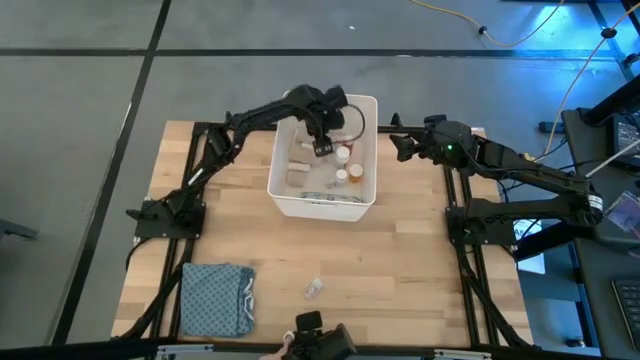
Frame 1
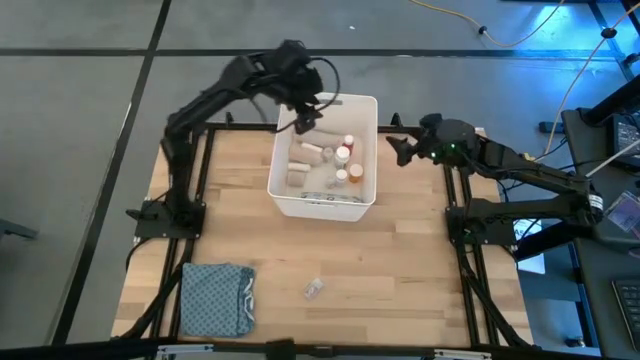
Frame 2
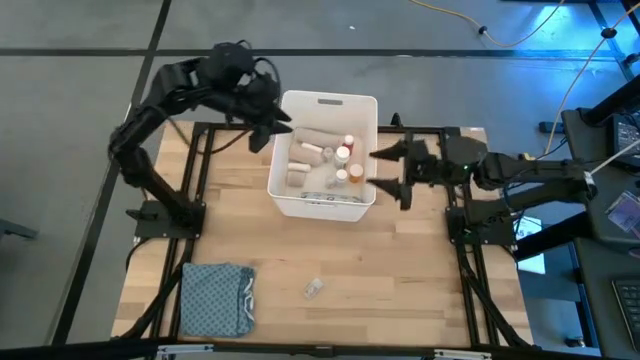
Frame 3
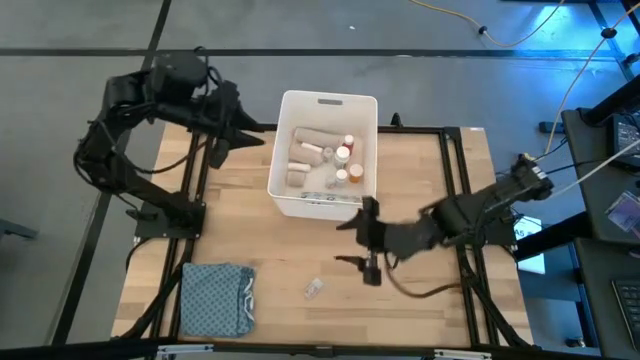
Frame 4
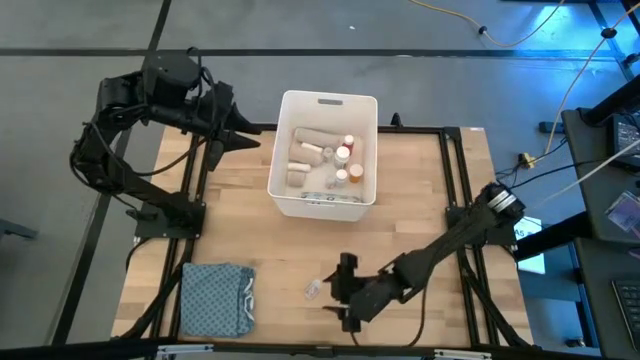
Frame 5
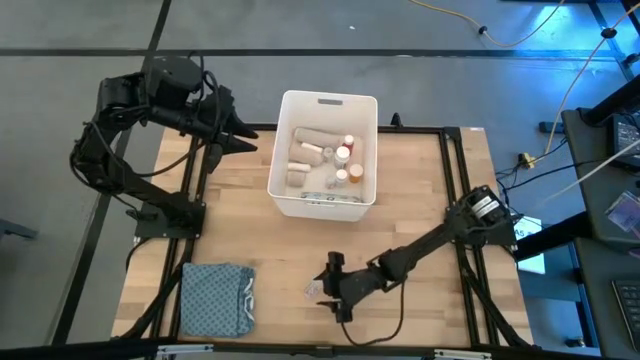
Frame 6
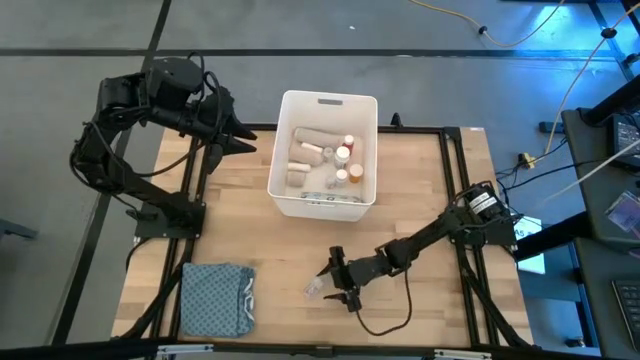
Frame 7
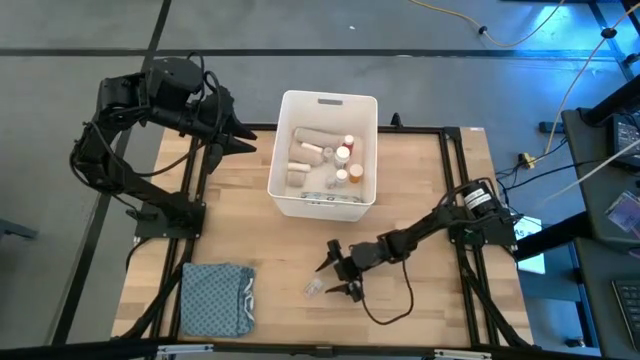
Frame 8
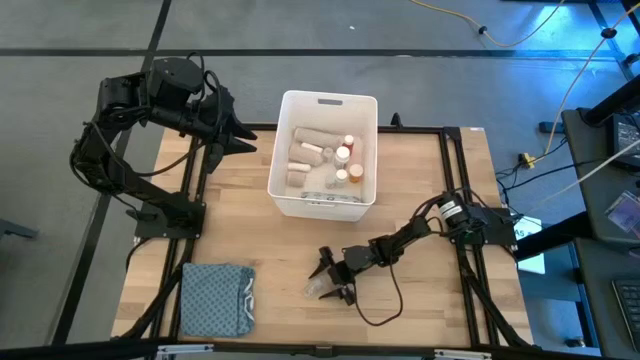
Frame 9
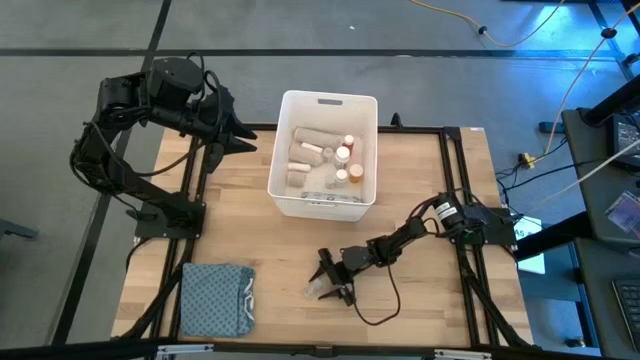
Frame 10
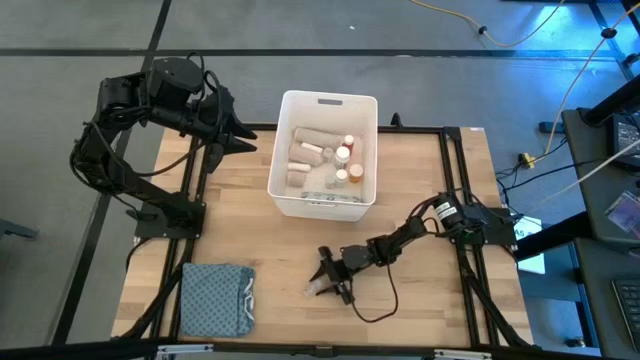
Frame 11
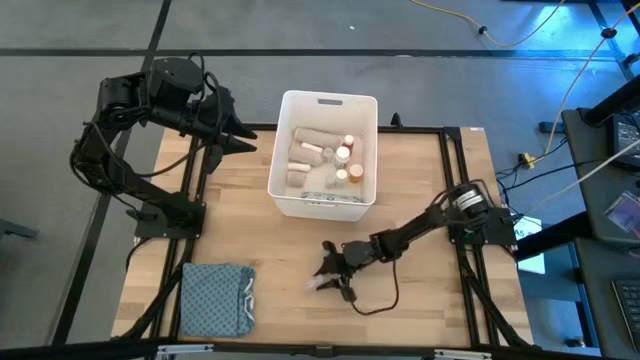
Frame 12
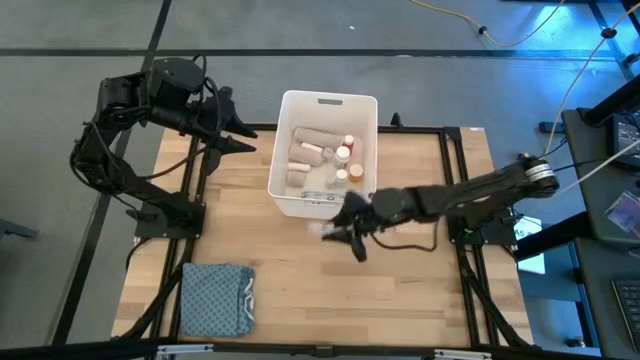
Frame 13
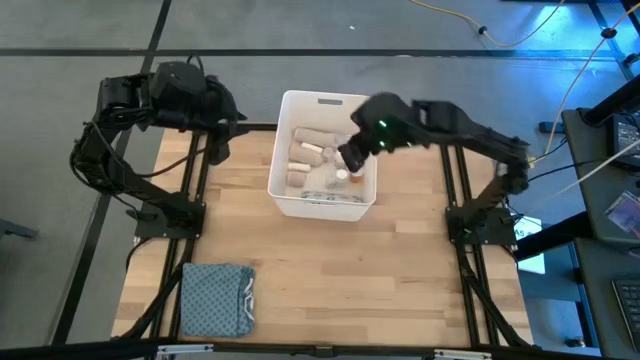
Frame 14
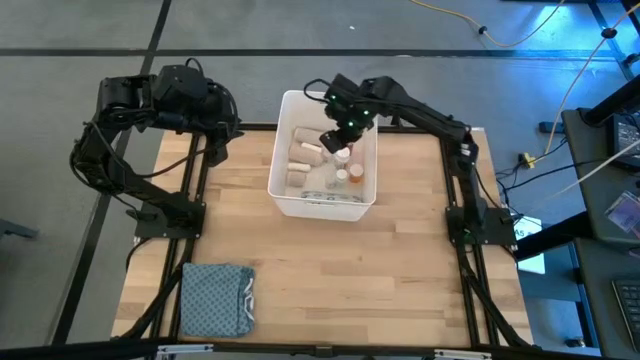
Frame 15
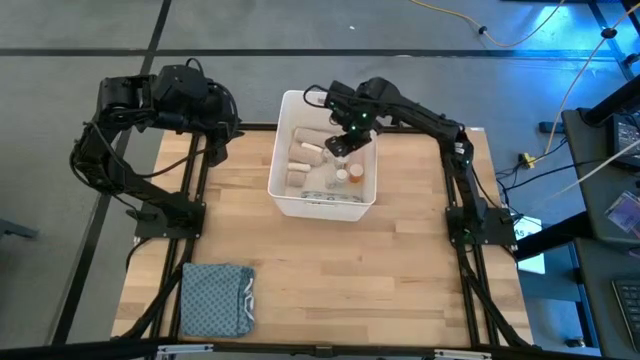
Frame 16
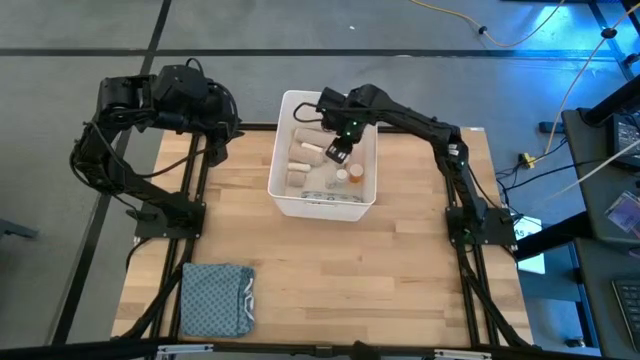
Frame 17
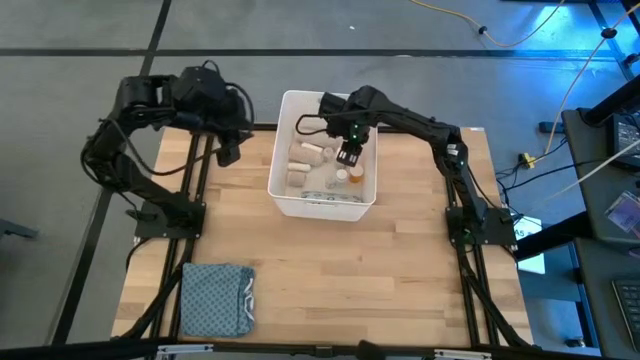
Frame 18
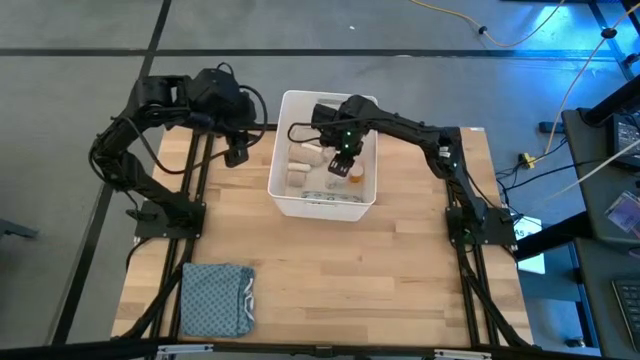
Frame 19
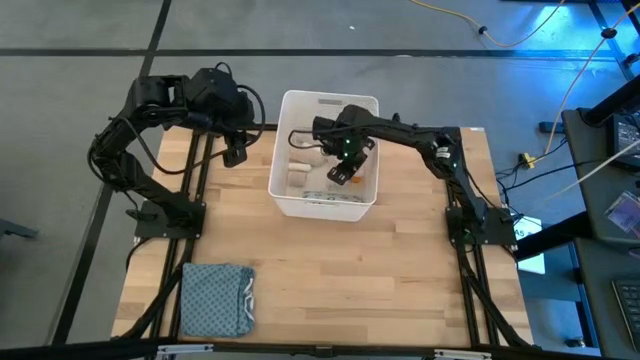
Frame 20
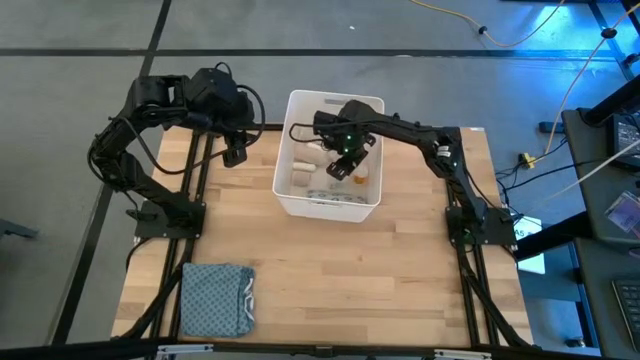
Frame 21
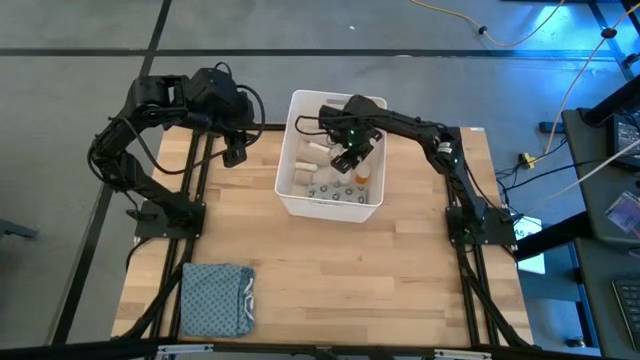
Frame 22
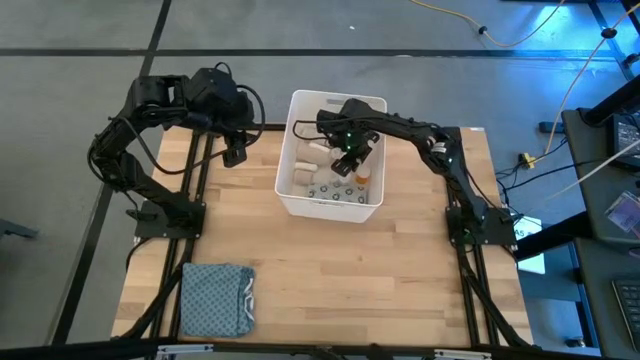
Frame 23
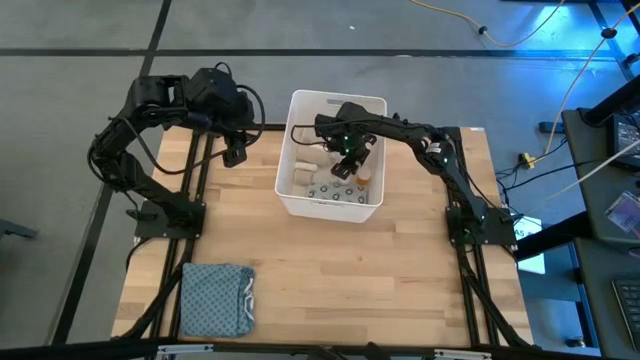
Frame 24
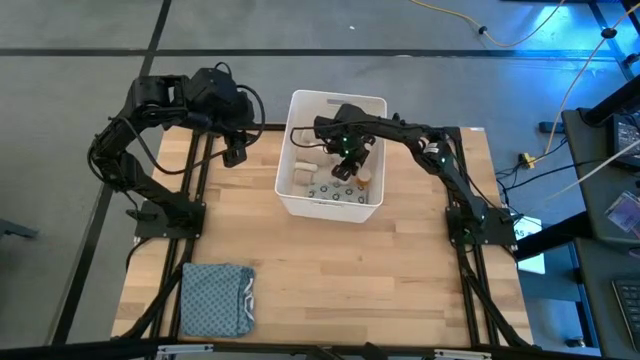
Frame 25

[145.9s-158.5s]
Task: Pick & place medical supplies in basket/bin
Put the transparent pill bottle into the white bin

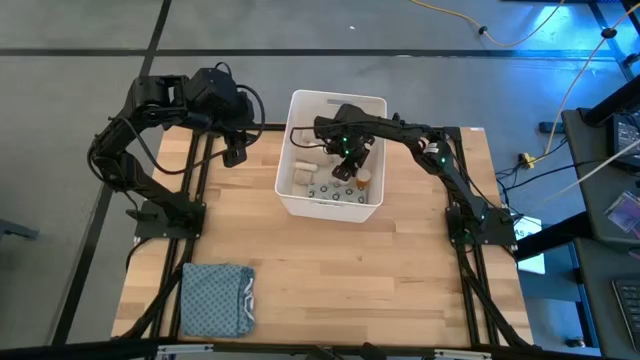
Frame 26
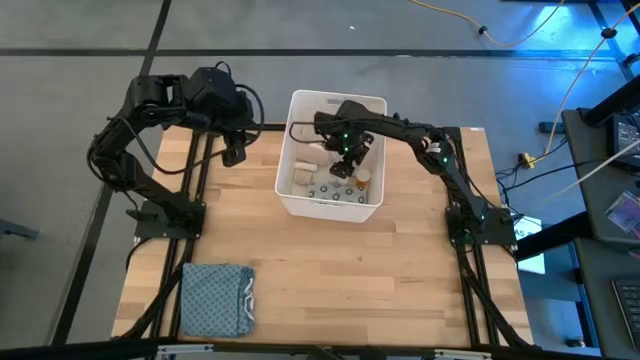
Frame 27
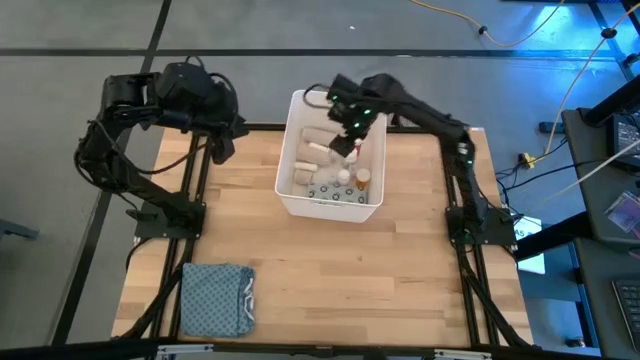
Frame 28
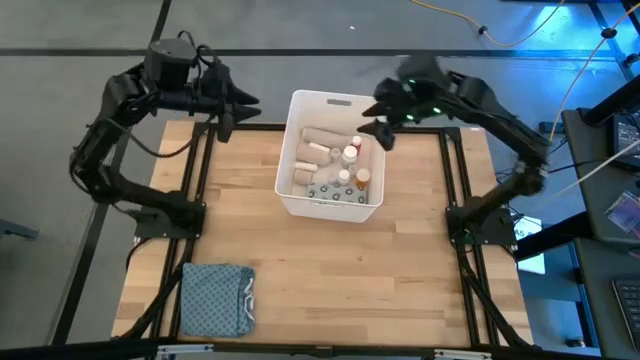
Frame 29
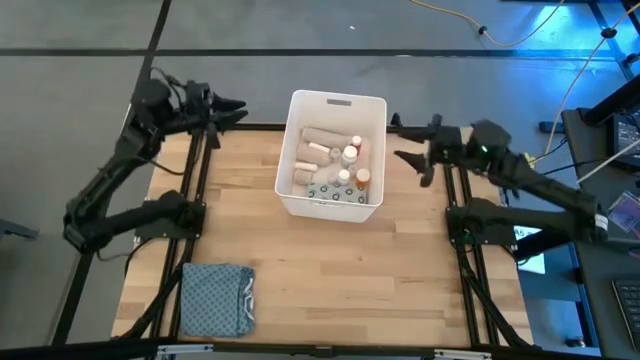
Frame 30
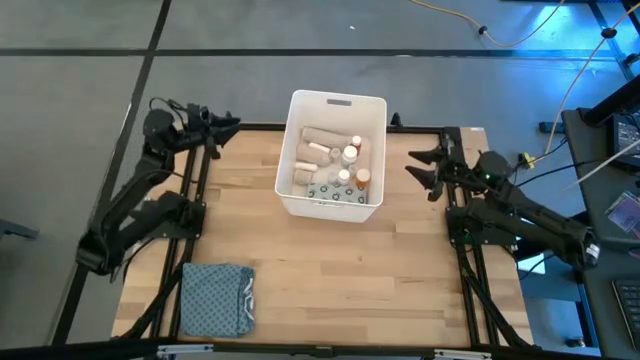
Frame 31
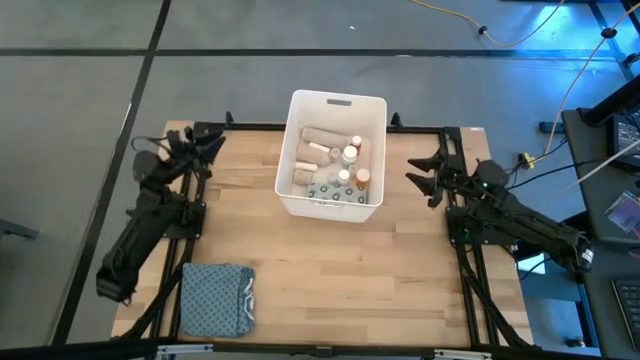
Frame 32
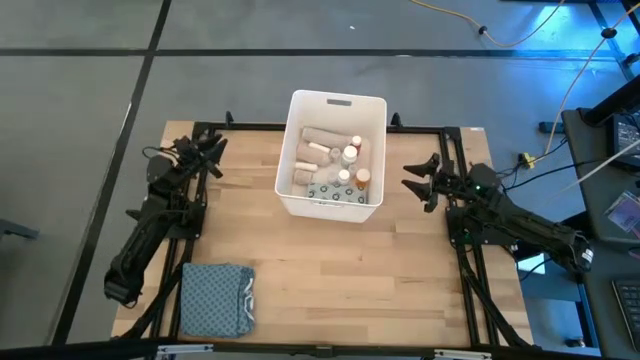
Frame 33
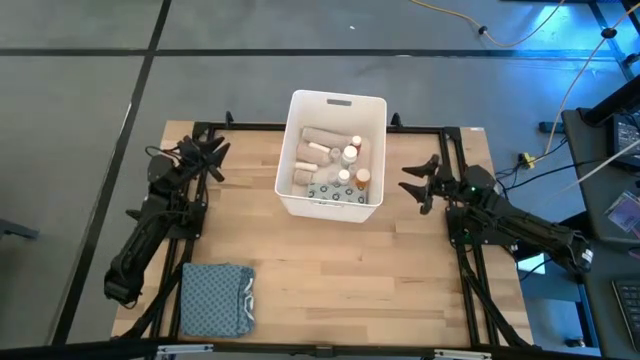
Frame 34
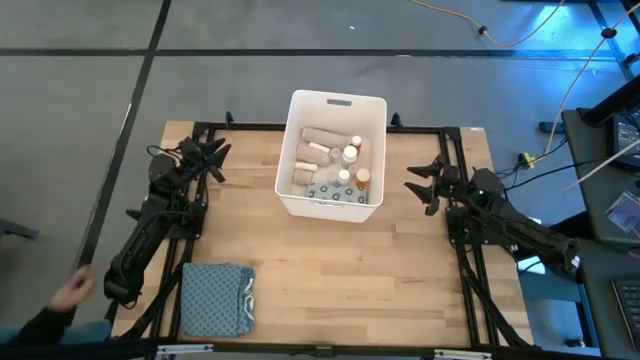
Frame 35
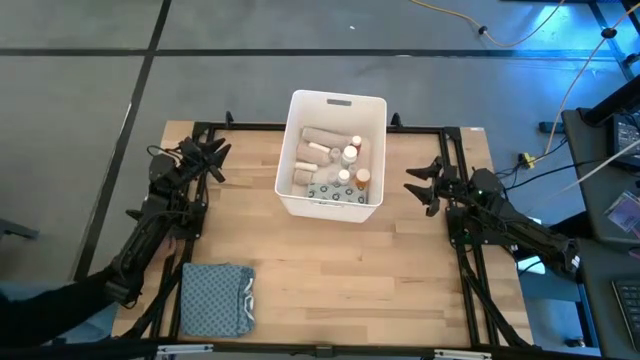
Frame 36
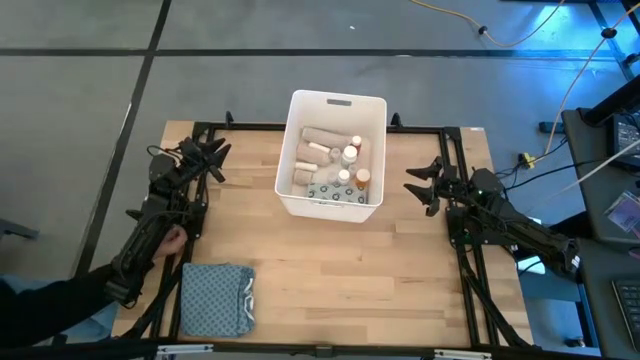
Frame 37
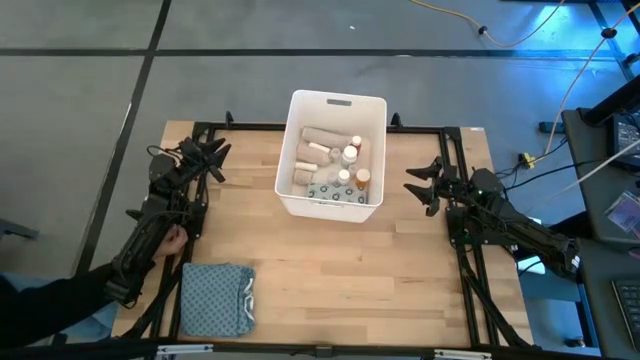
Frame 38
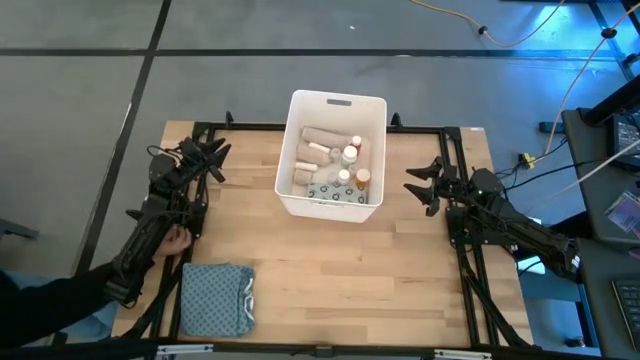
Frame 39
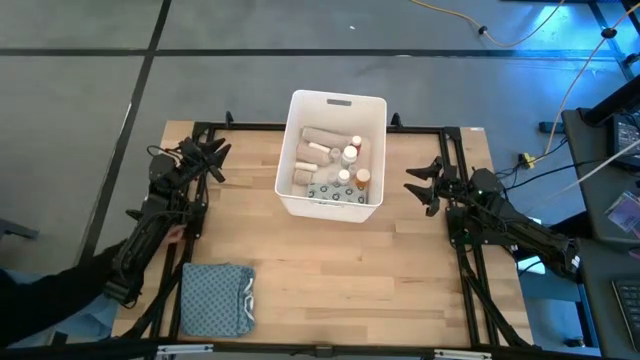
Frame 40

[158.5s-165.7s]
Return to Home Position

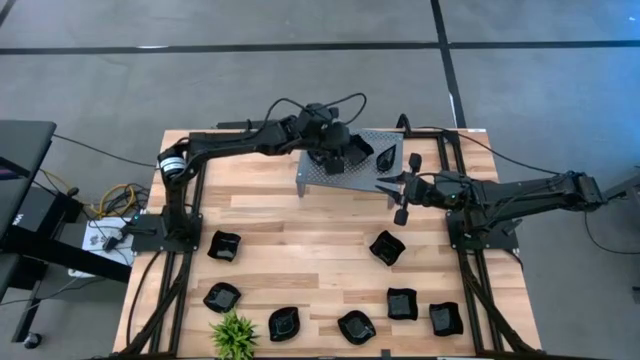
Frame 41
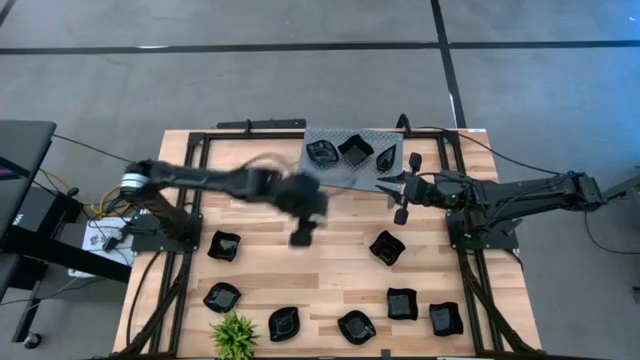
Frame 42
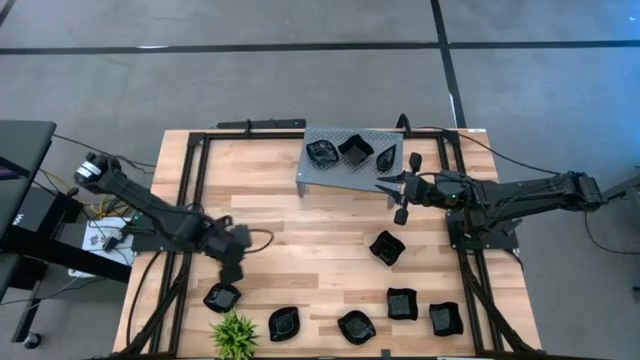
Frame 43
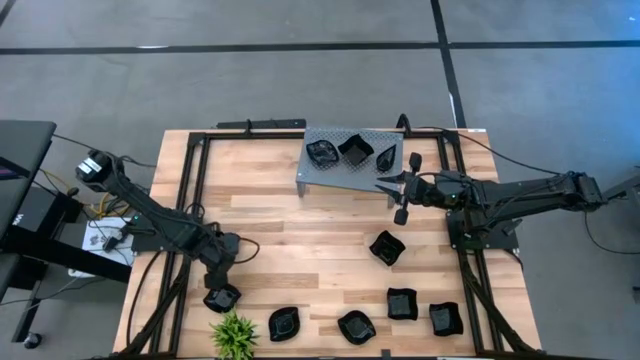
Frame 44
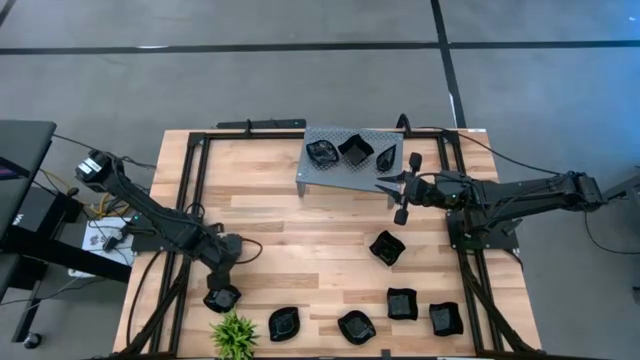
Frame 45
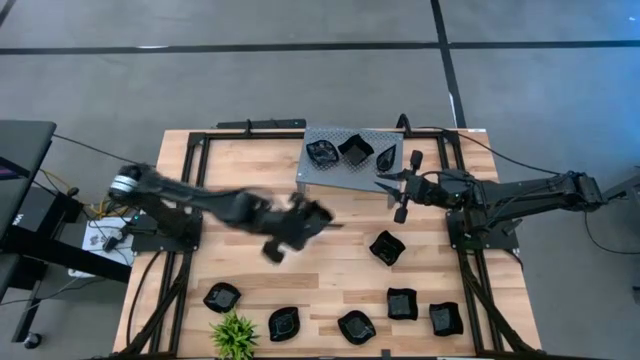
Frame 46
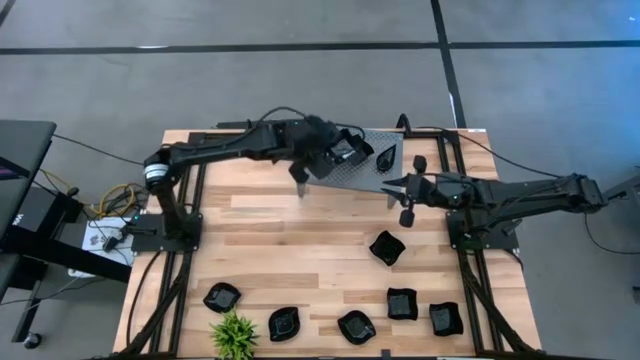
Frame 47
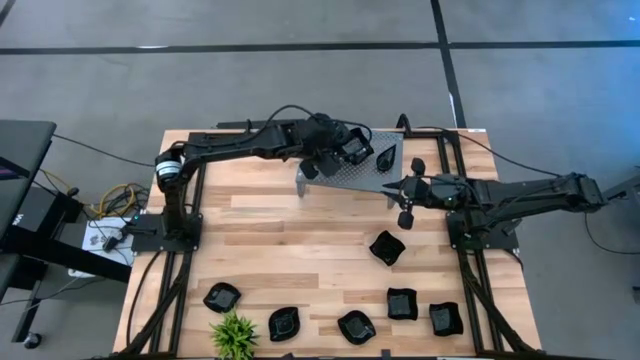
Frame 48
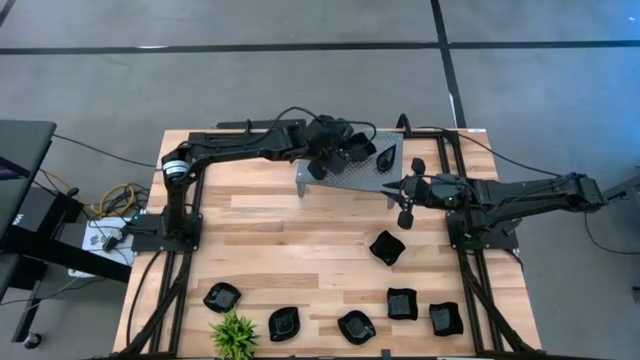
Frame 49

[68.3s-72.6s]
Task: Pick & Place Mini shaped plates
Stack the distorted square plate on the other distorted square plate on the shelf
